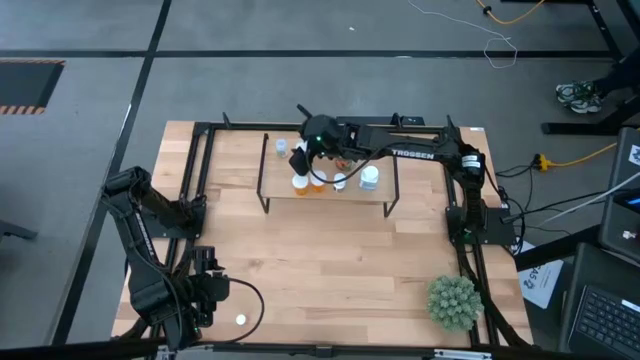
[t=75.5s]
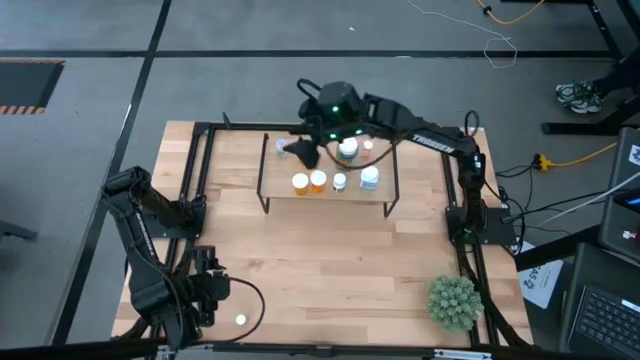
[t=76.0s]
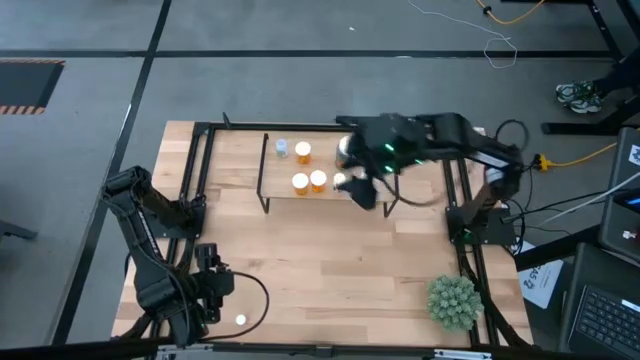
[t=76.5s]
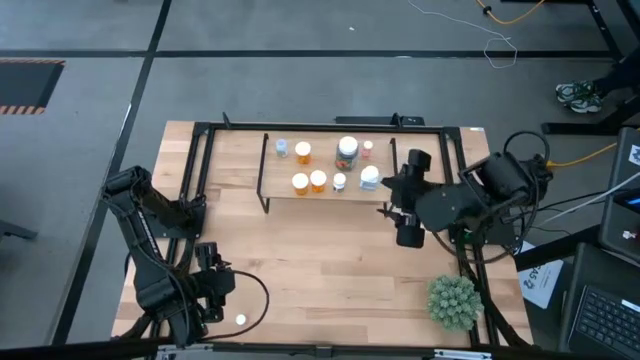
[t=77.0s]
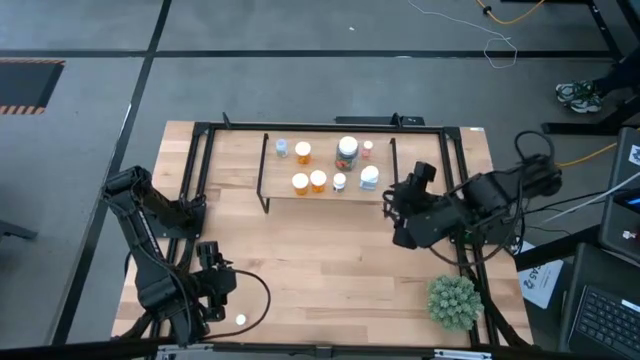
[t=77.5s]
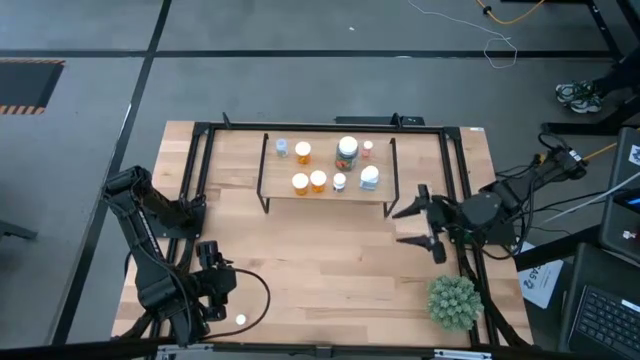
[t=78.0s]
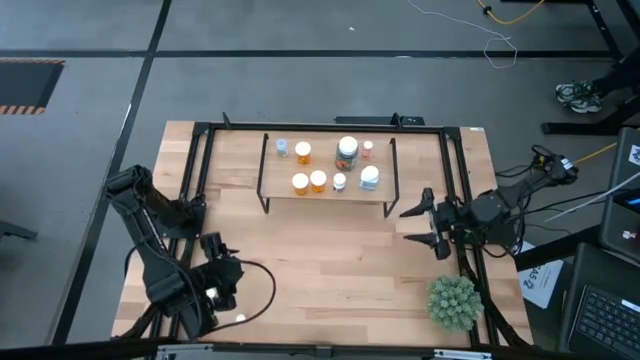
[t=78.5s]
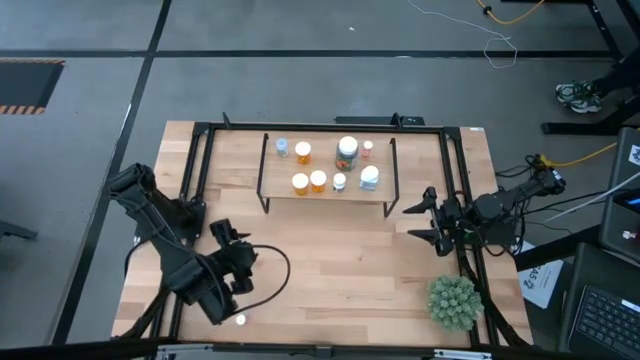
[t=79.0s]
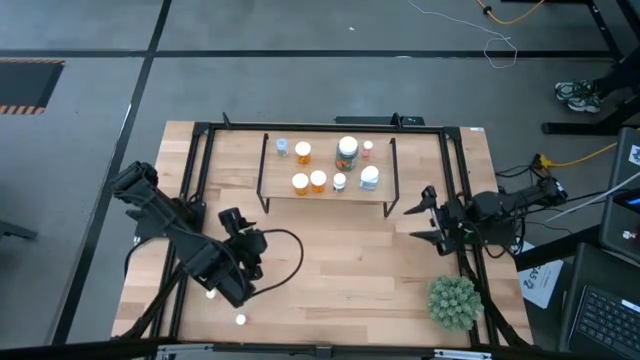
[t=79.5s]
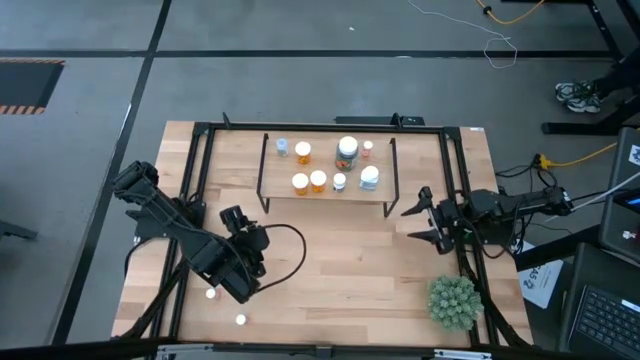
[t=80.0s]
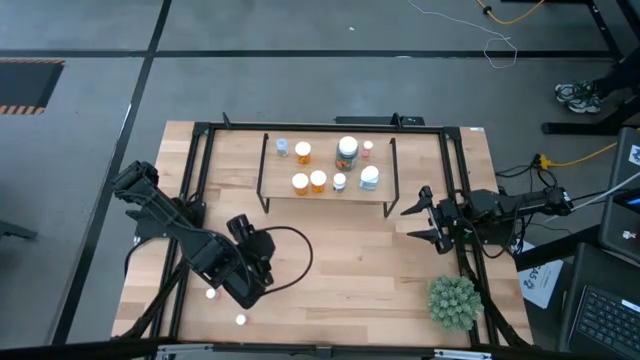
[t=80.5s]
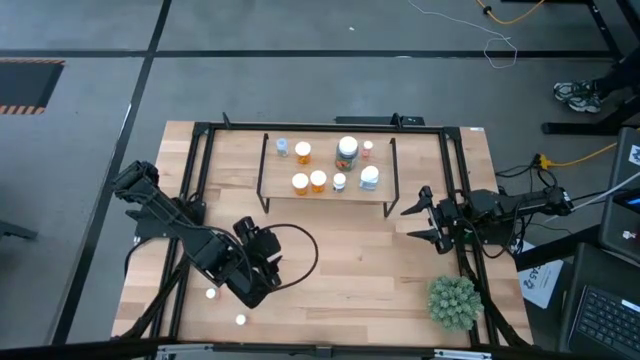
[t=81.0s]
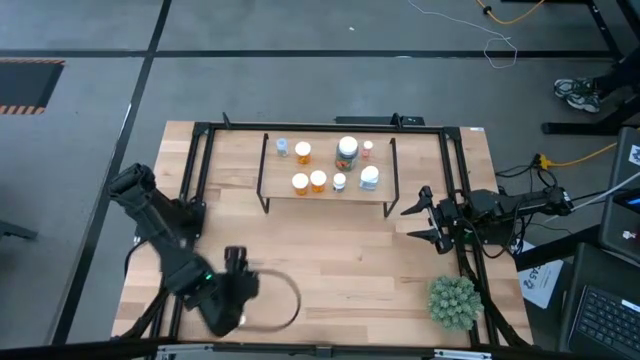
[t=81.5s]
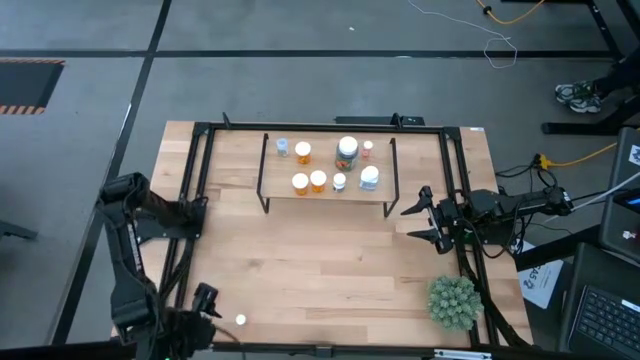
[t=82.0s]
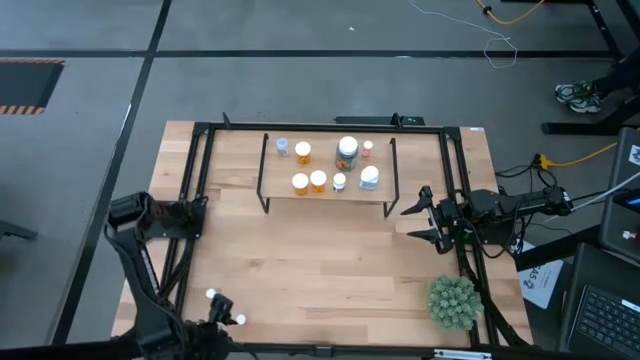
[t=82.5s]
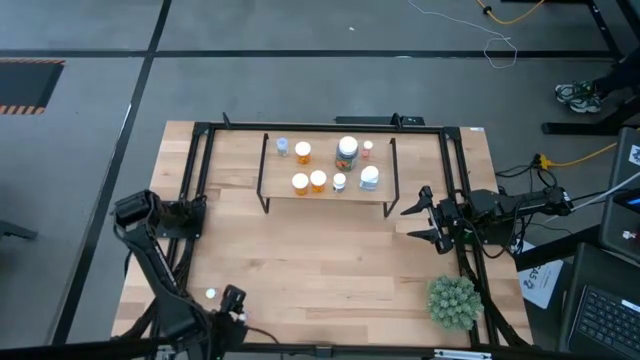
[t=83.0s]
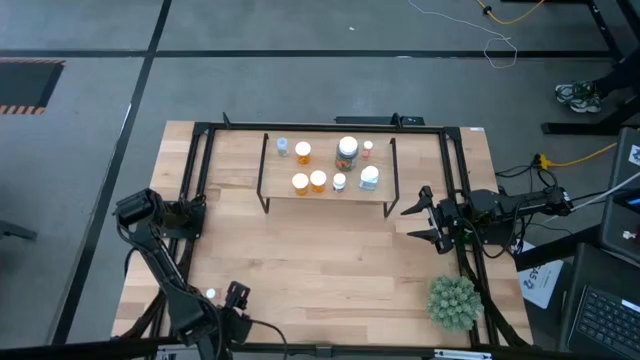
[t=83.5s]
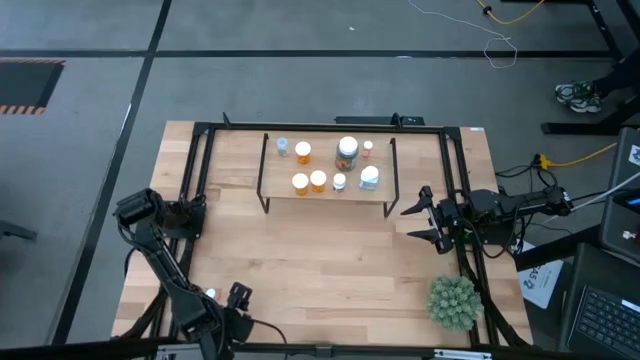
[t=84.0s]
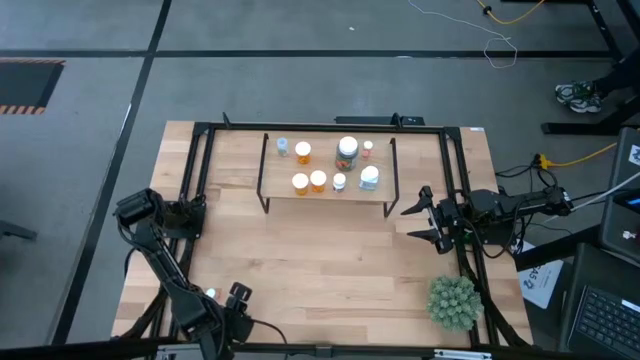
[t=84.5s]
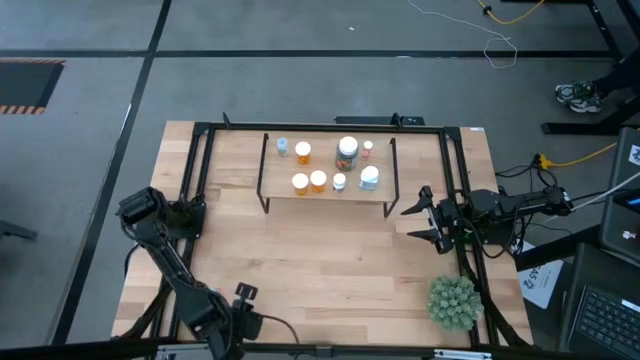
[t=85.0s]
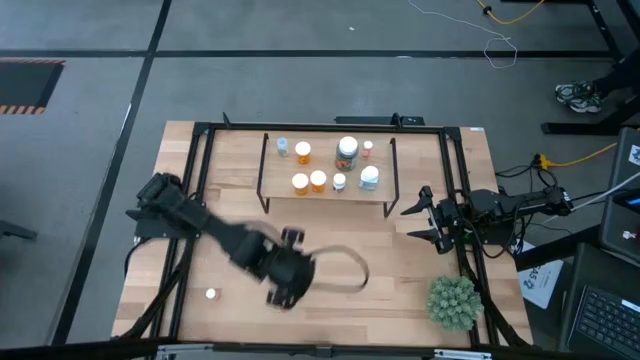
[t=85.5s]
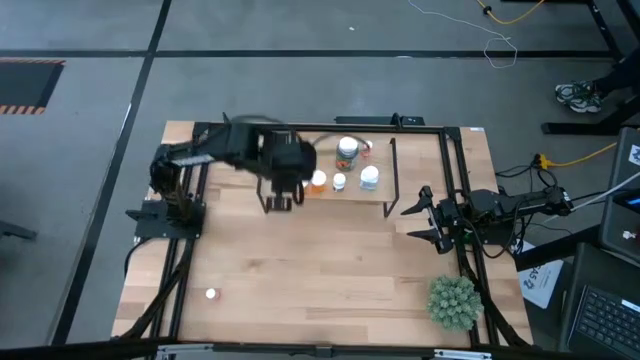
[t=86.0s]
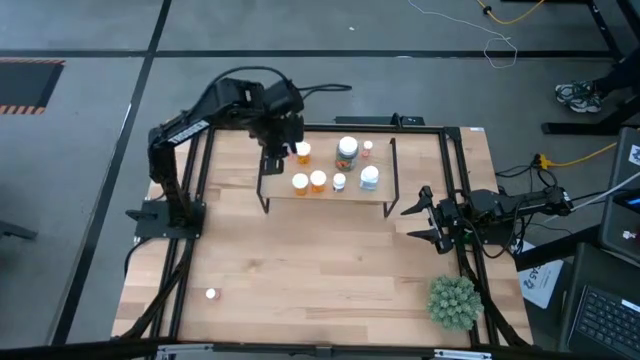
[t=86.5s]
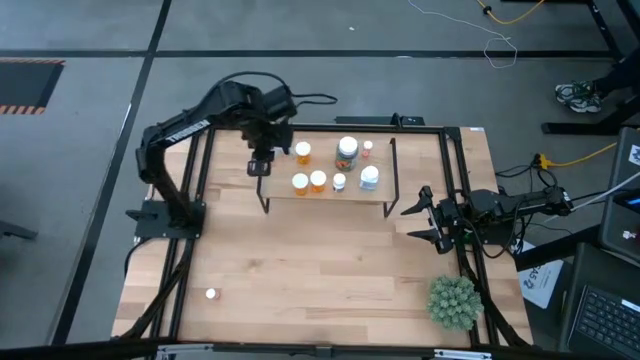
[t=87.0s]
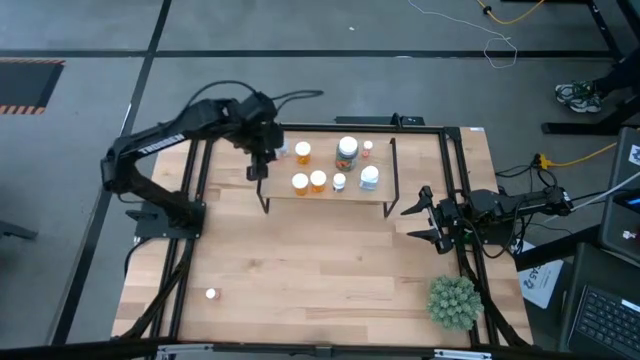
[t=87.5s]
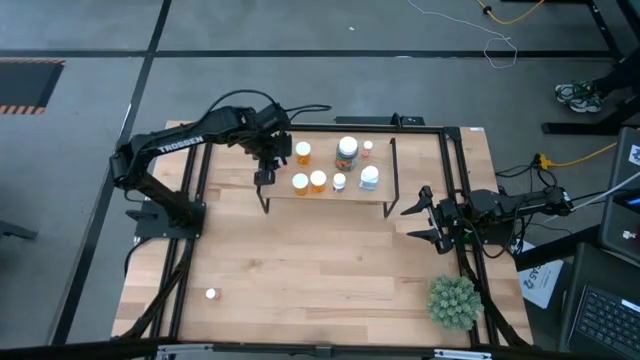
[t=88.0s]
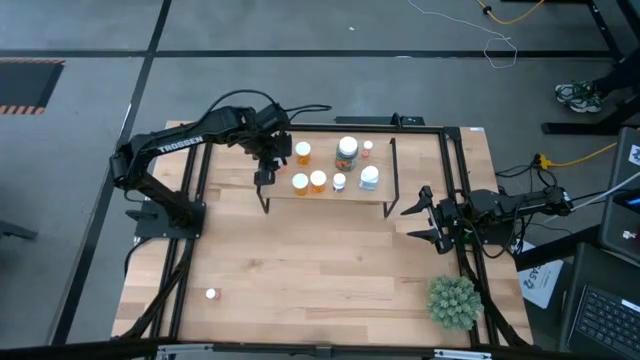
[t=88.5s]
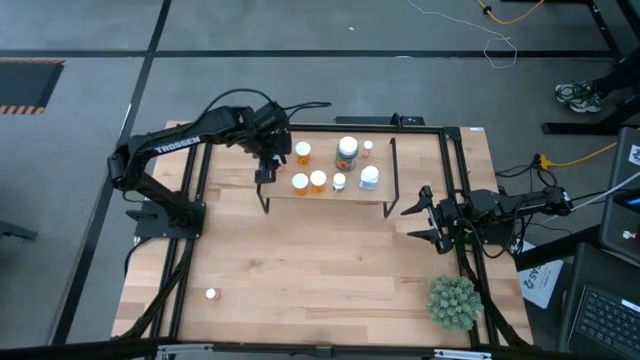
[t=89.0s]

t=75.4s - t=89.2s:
Task: Pick and place medicine bottles onto shelf by color
Put the bottom pink pill bottle on the shelf

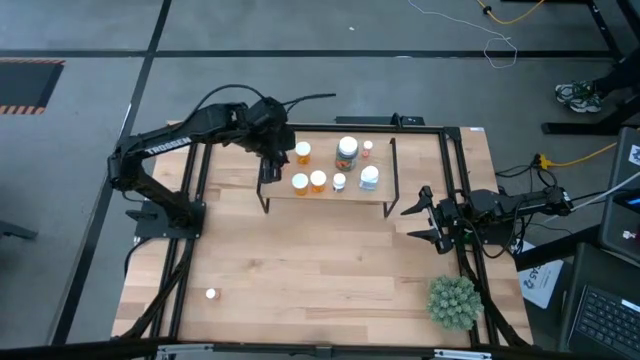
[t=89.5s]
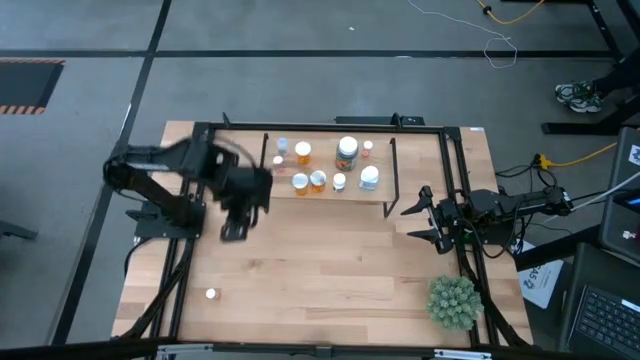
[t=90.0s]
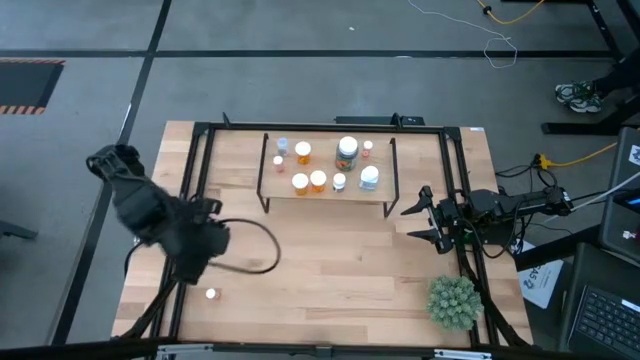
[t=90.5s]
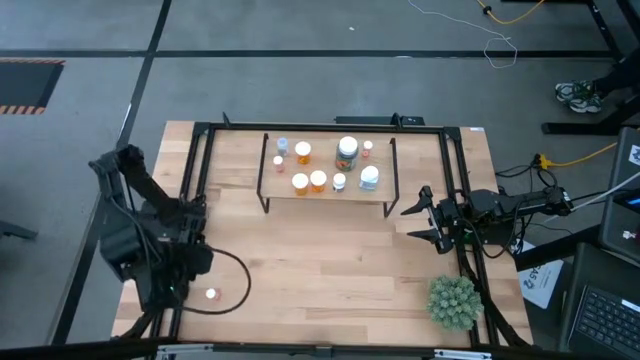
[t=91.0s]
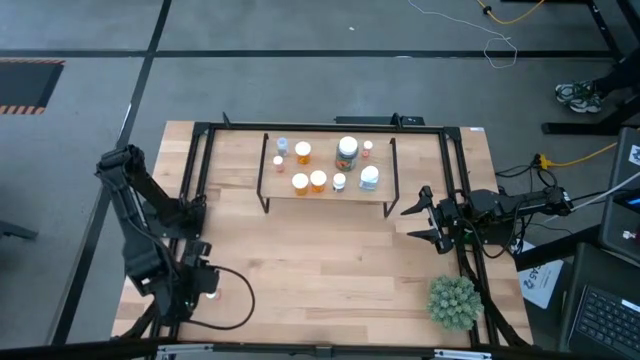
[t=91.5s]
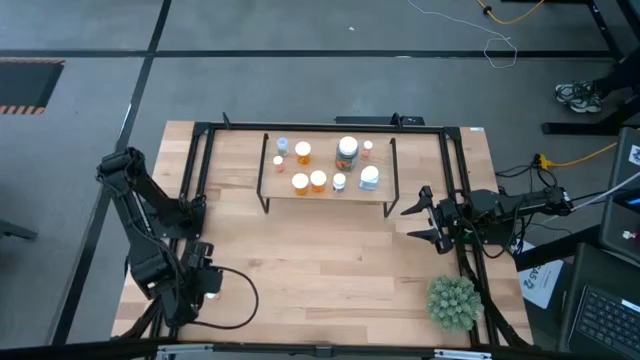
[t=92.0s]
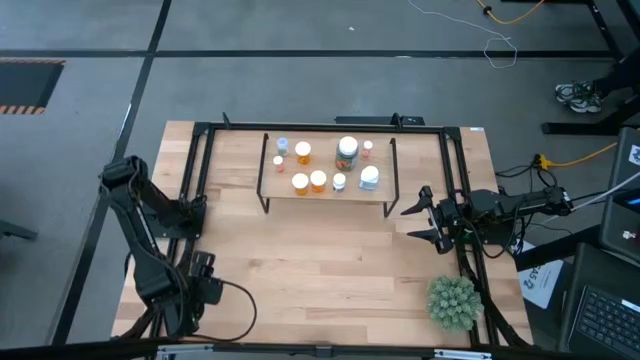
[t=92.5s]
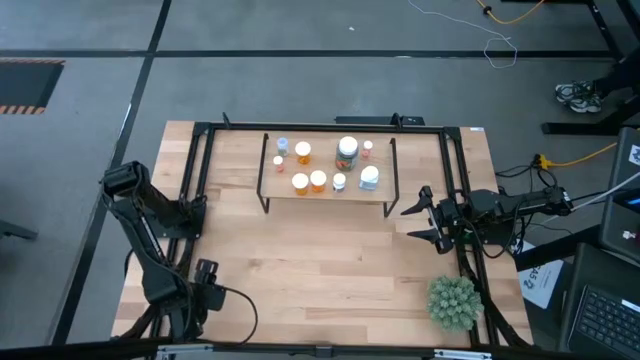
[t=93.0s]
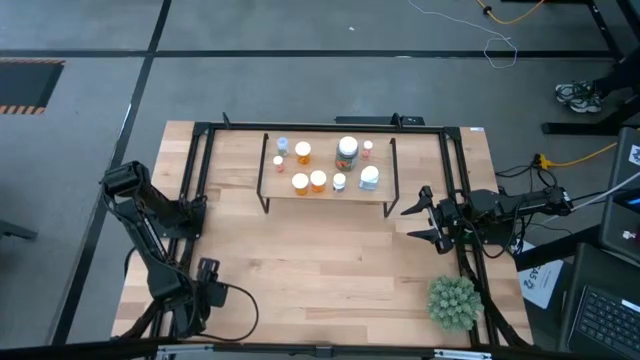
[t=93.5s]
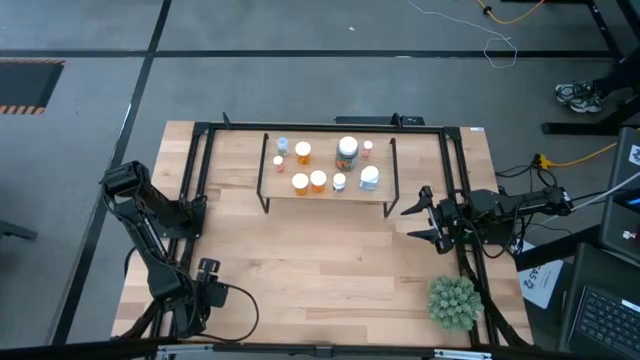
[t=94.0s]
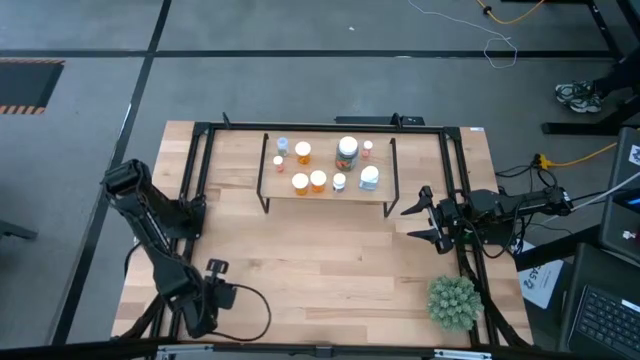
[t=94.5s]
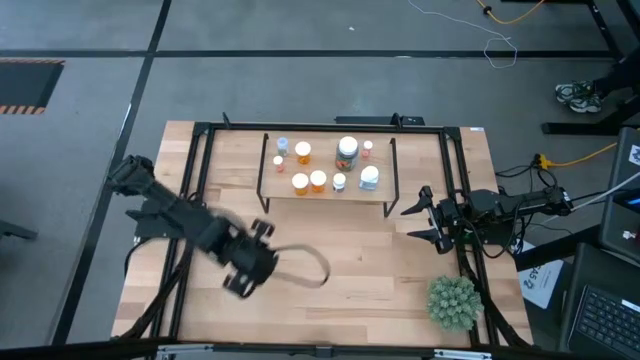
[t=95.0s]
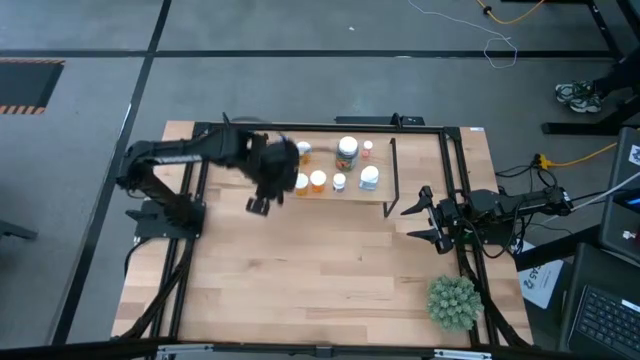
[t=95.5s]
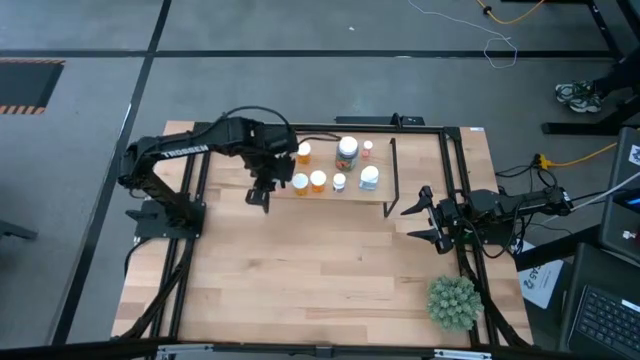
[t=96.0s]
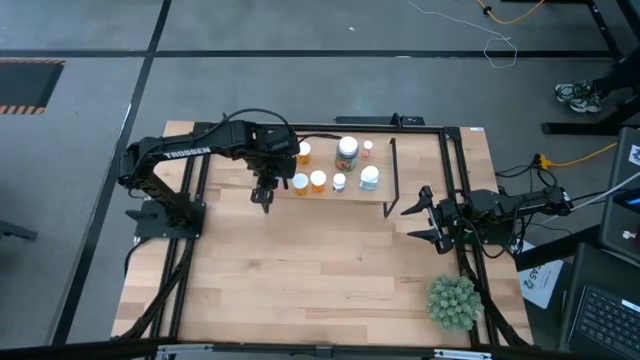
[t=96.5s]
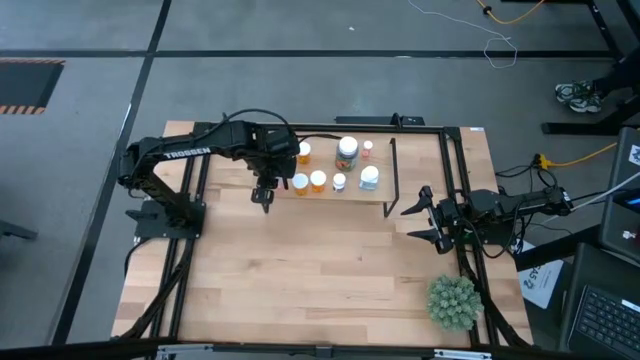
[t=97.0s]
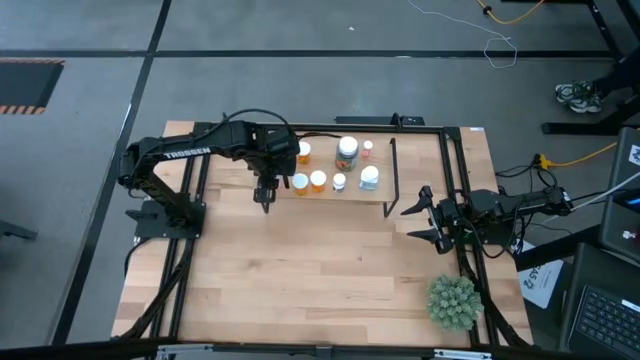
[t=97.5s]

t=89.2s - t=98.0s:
Put the pink pill bottle on the shelf
